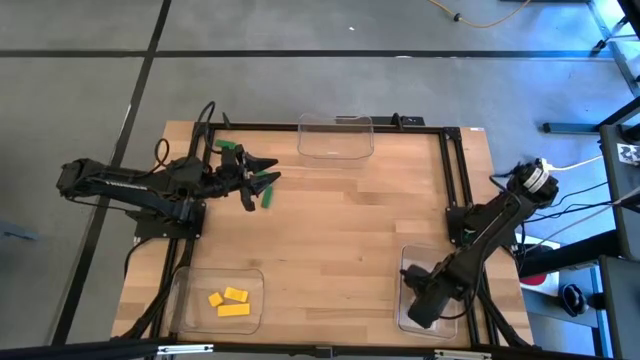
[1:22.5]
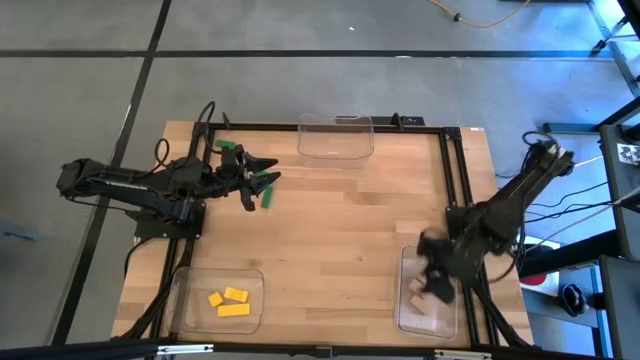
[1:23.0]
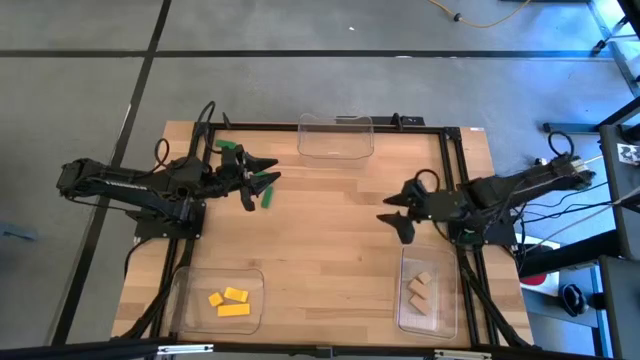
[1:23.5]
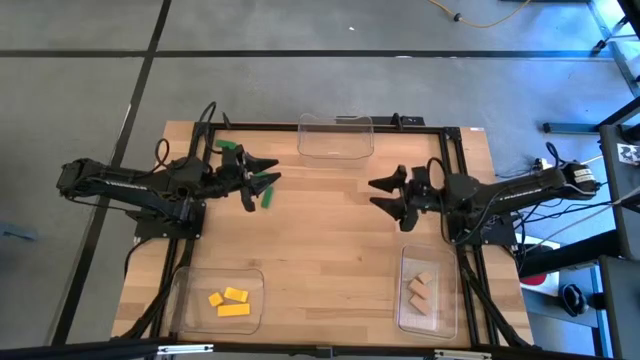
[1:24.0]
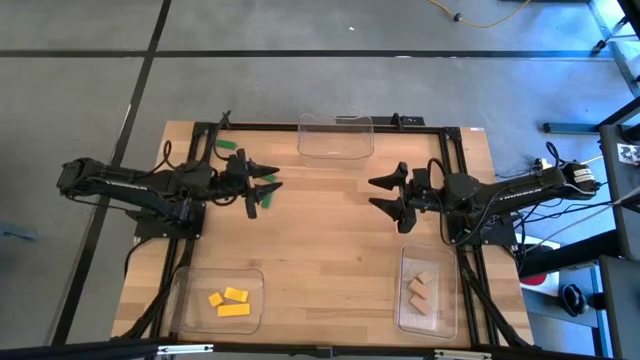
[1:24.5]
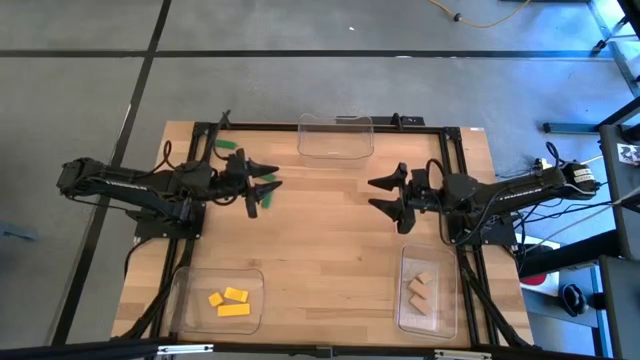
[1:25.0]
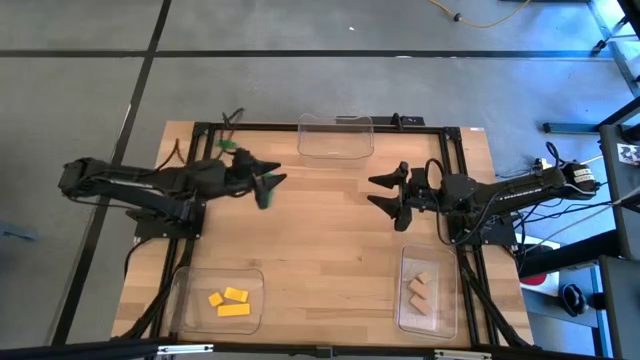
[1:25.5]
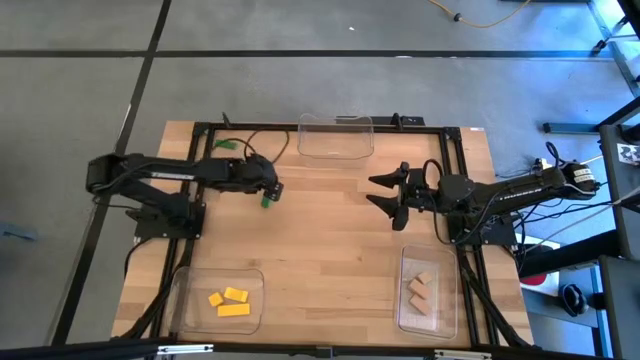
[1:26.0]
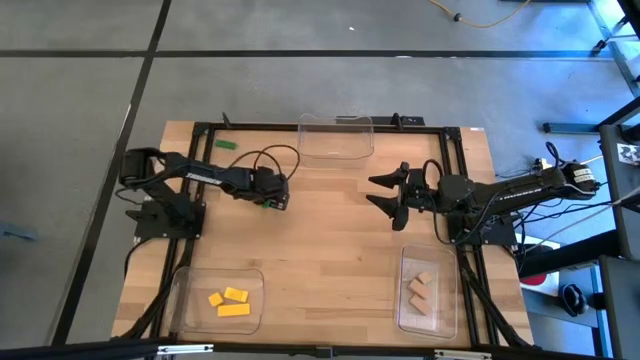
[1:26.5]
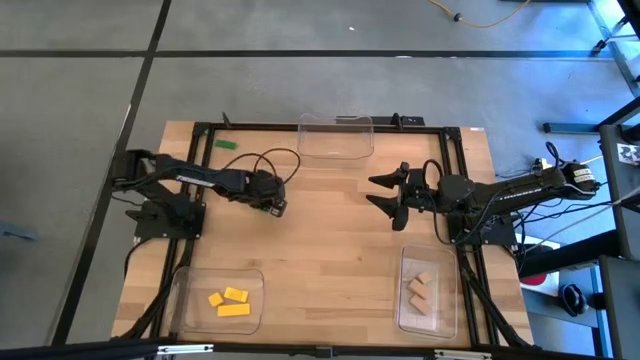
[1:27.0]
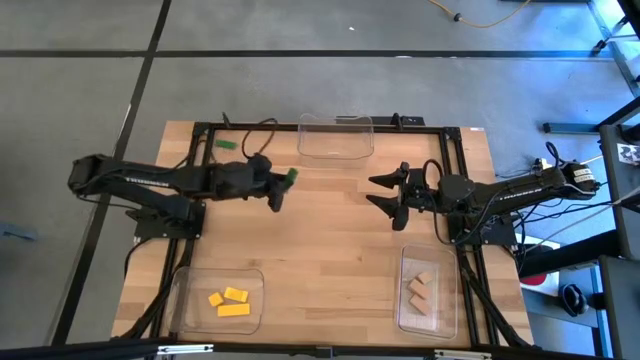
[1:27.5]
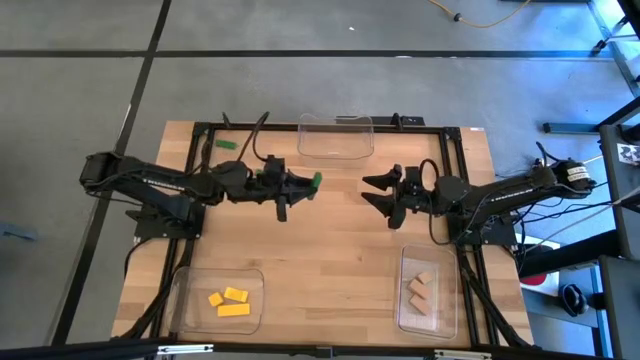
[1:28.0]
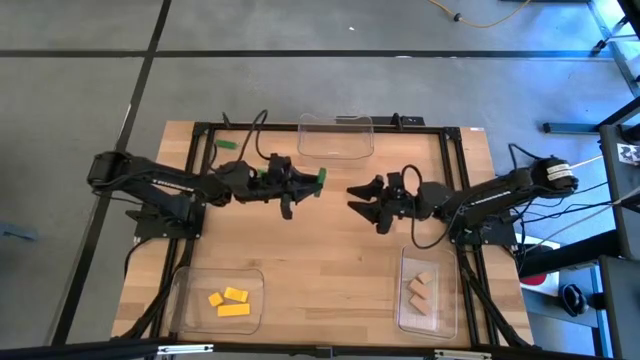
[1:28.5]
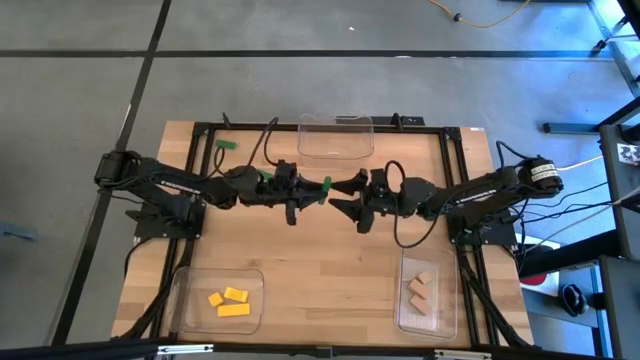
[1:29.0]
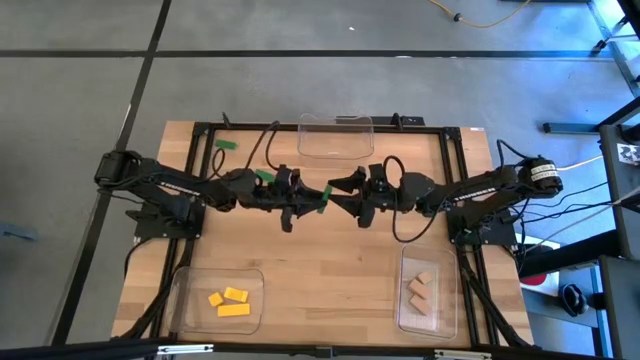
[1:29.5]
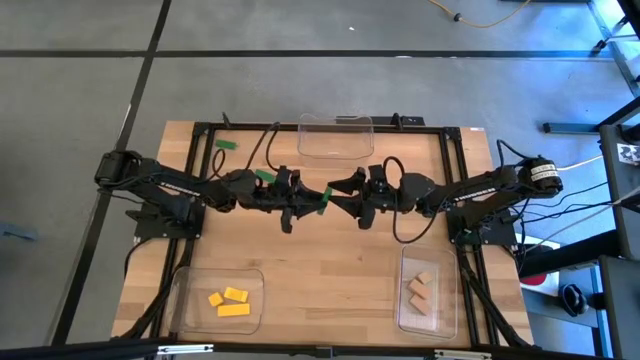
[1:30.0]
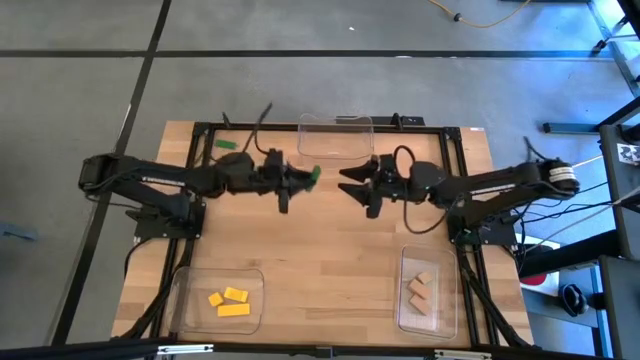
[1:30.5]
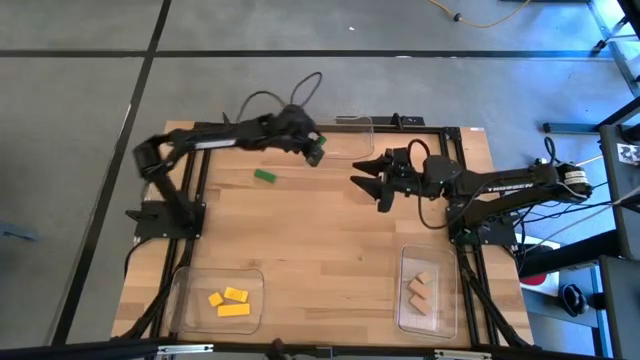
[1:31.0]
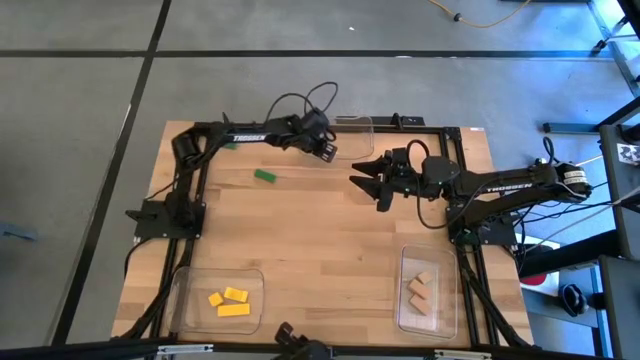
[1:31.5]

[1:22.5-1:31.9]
Task: Sort & place blocks by color
Put the bottom green block into the top transparent bin

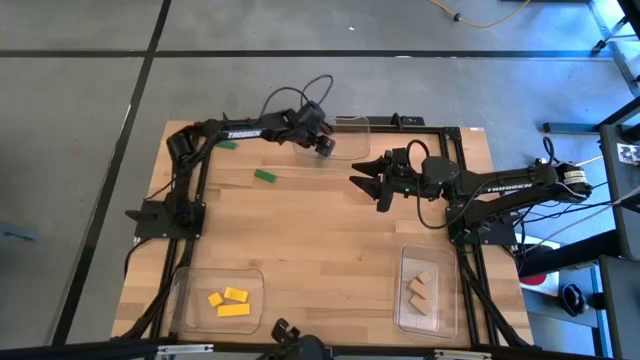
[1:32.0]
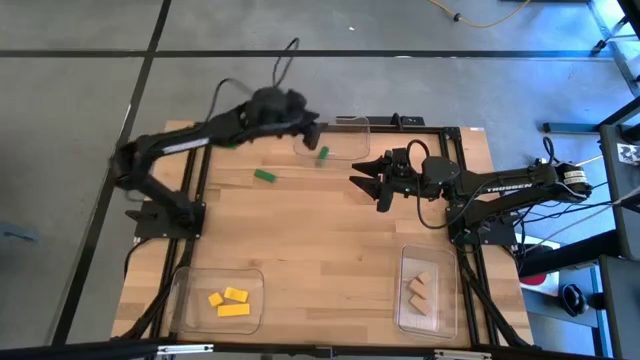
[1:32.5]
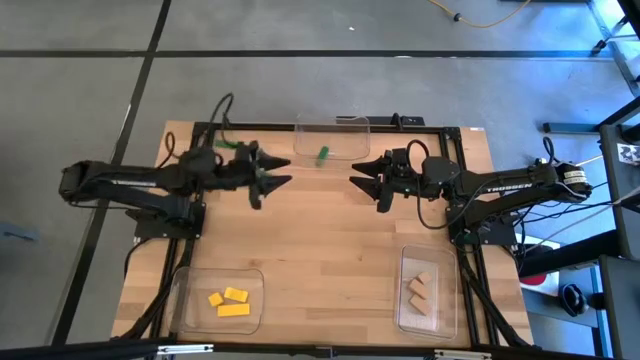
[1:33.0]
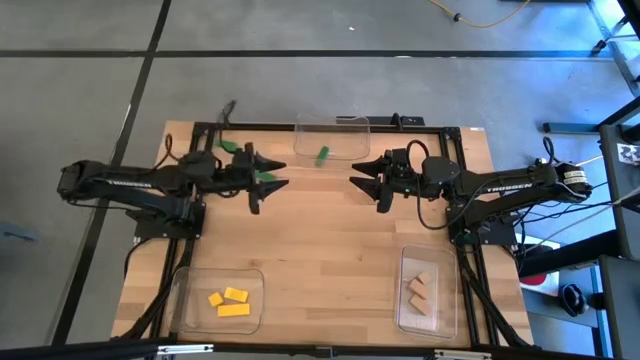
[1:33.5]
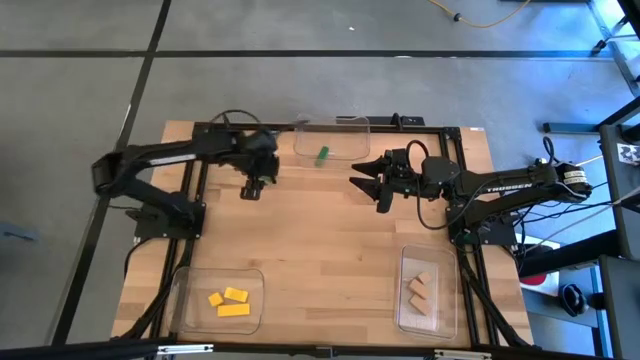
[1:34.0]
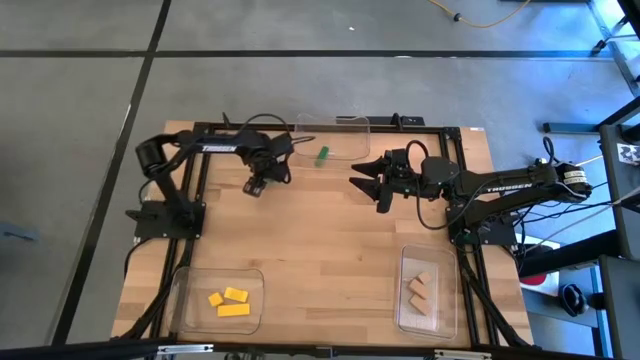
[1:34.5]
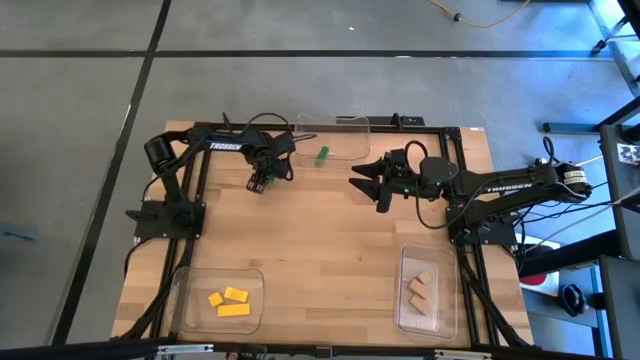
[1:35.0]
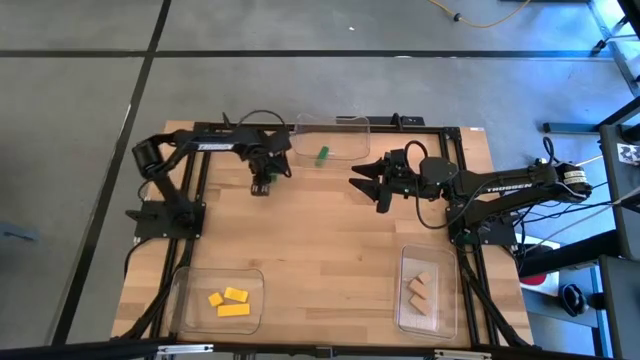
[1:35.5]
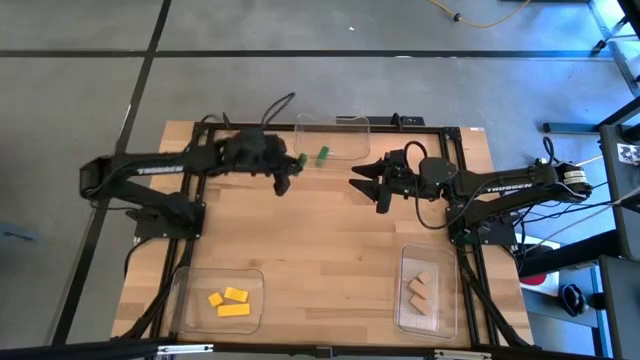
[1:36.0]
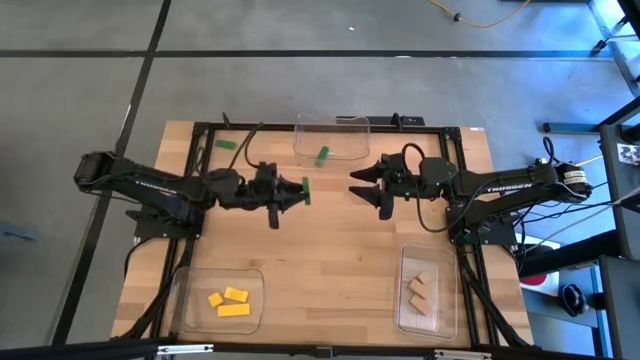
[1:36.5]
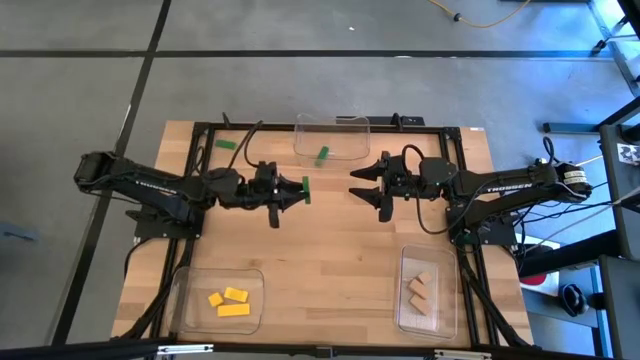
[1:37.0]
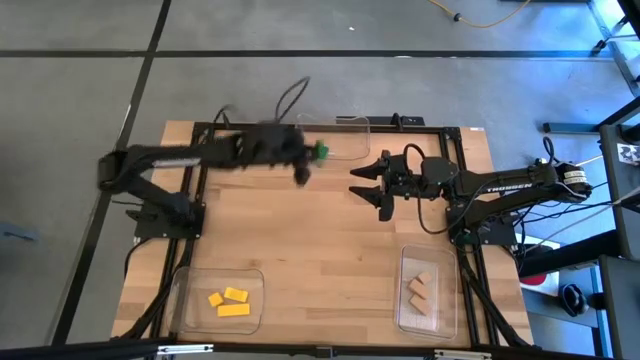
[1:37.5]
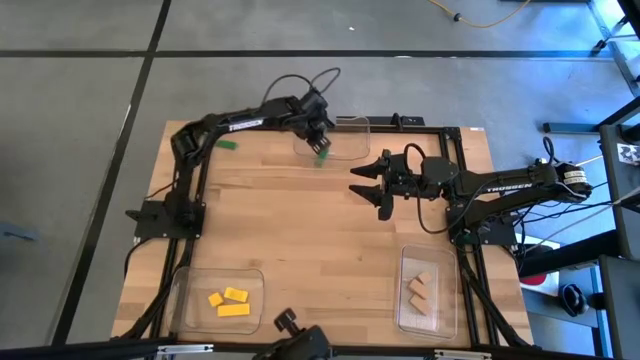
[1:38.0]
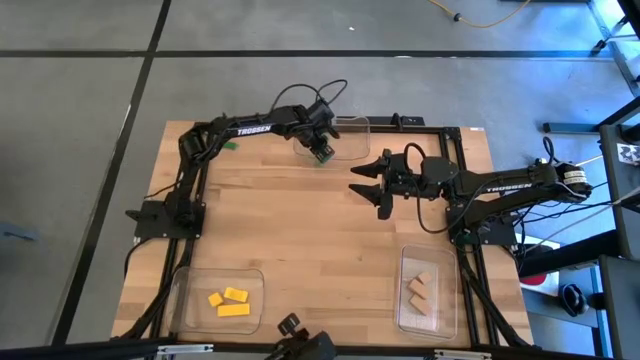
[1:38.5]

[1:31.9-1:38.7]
Put the right green block into the top transparent bin

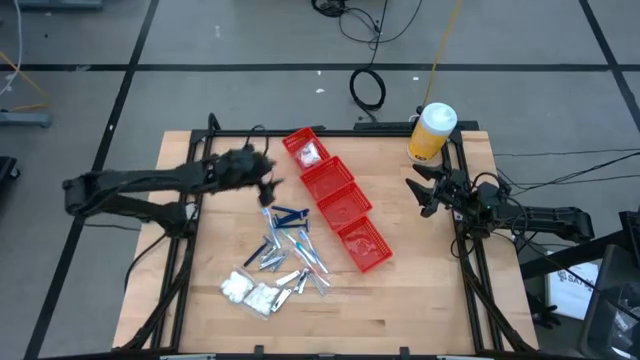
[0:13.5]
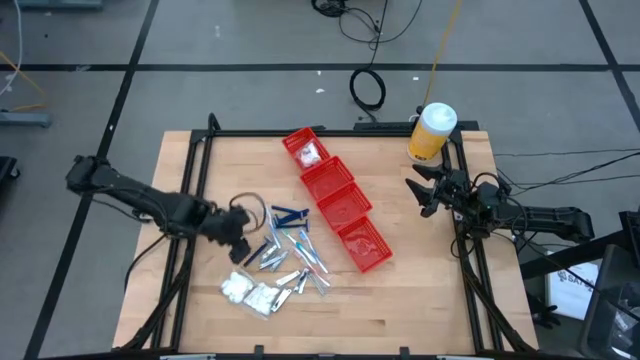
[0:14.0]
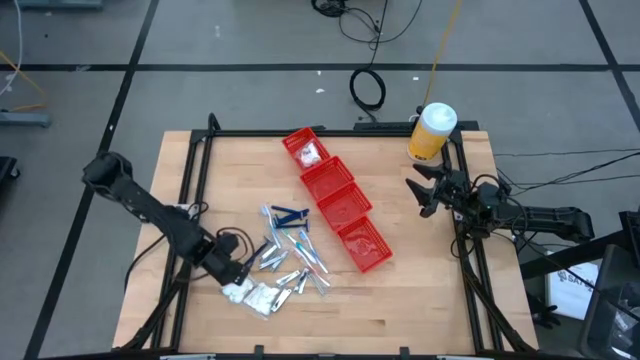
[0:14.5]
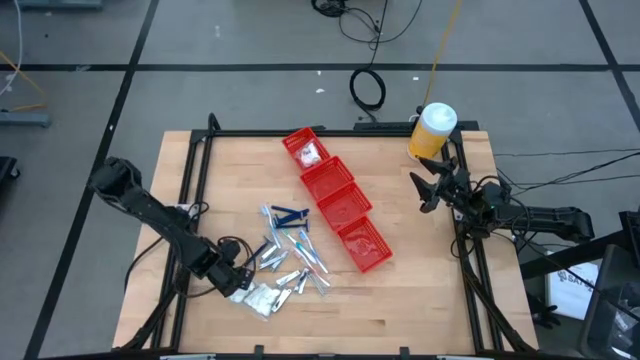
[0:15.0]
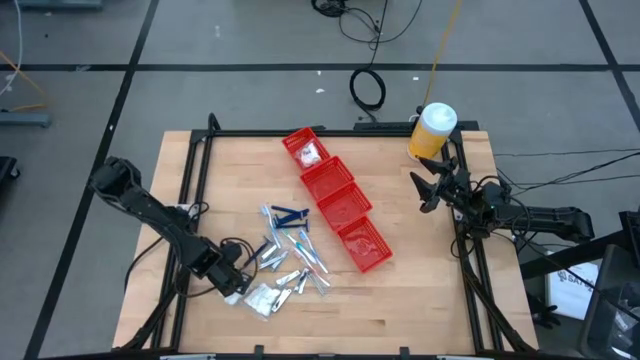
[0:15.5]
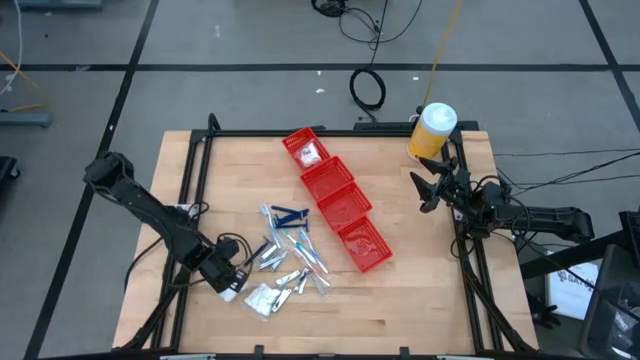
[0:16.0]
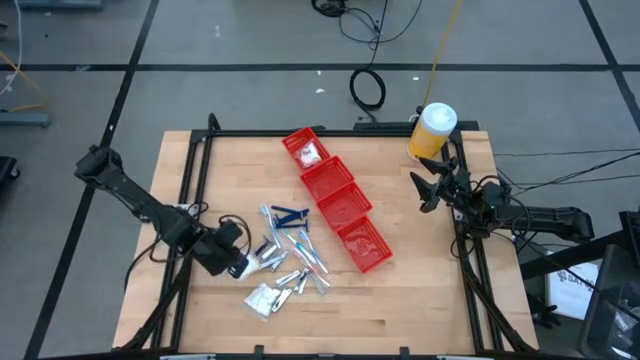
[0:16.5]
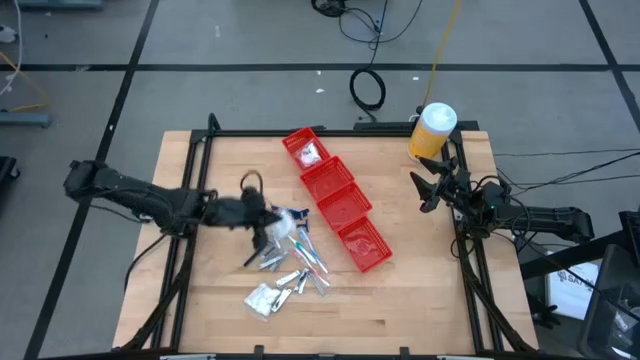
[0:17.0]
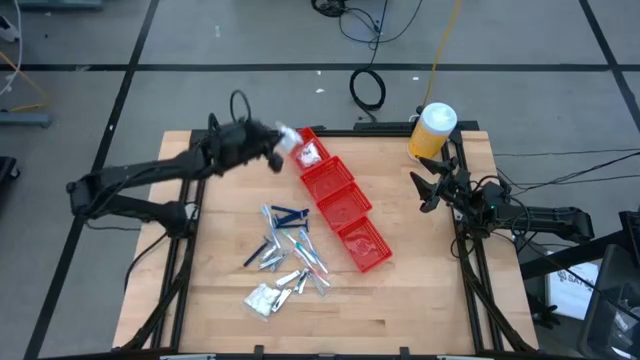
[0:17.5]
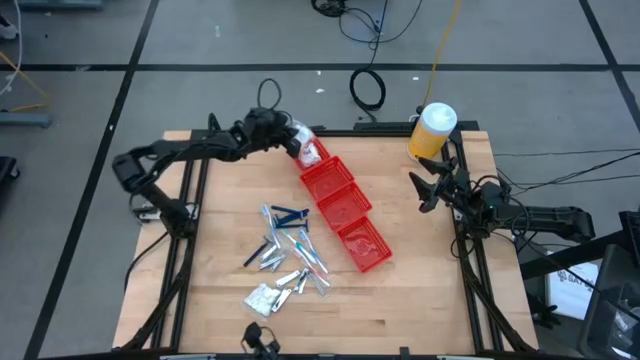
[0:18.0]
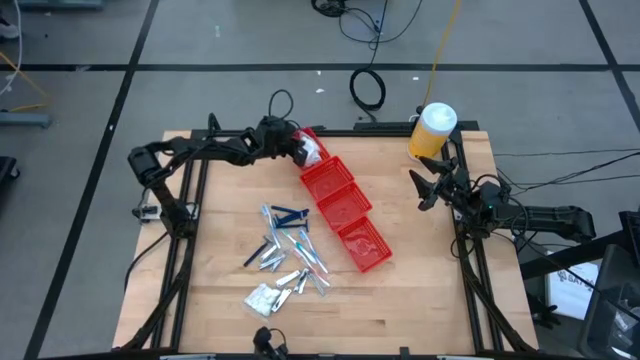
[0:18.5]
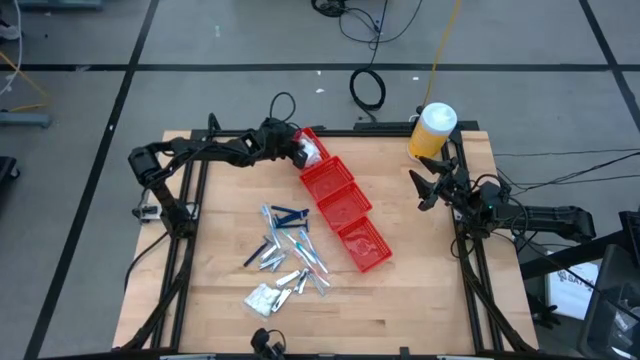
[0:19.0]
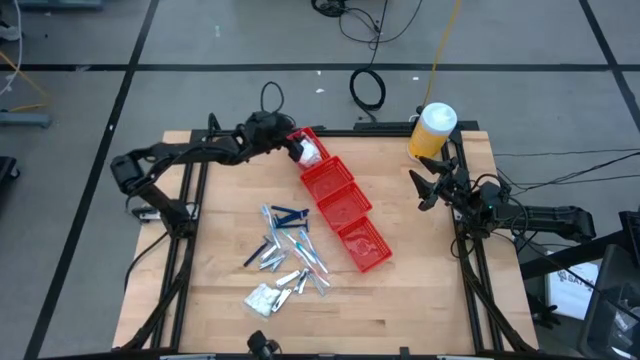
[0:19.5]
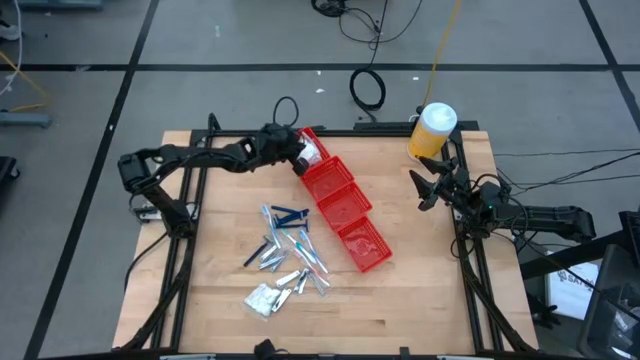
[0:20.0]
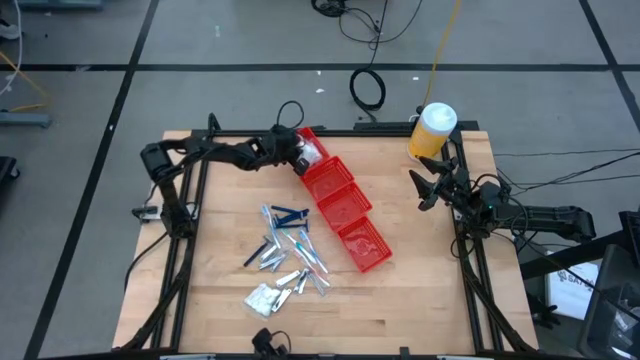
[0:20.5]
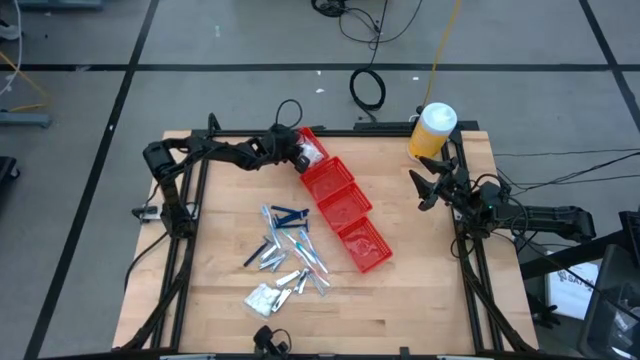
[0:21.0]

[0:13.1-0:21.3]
Task: Pick & Place Travel size toiletries
Put the left white cotton pack into the top red bin
